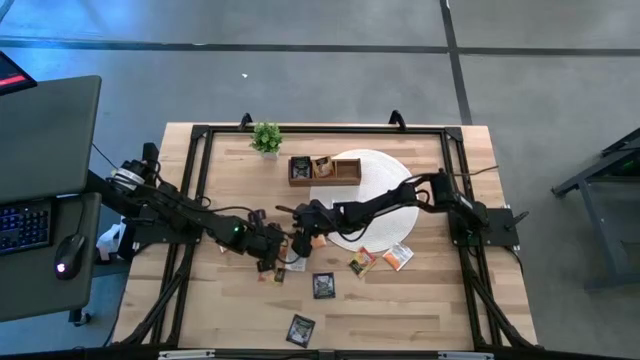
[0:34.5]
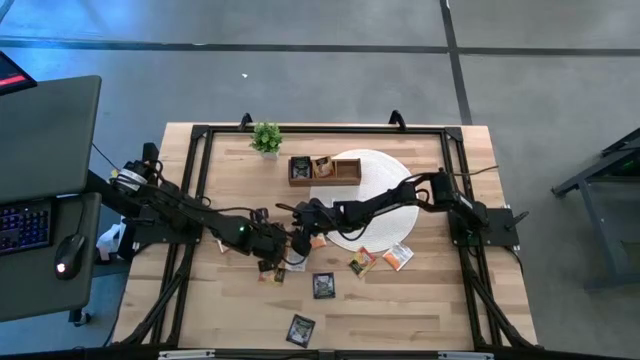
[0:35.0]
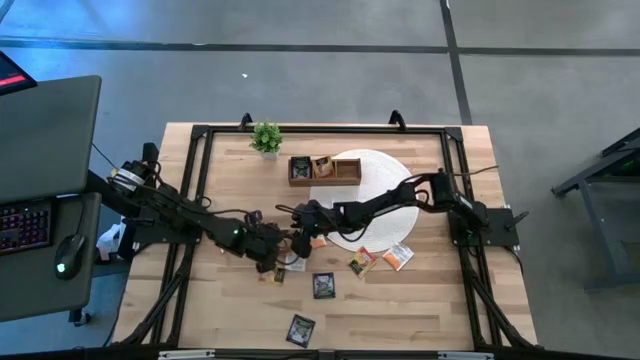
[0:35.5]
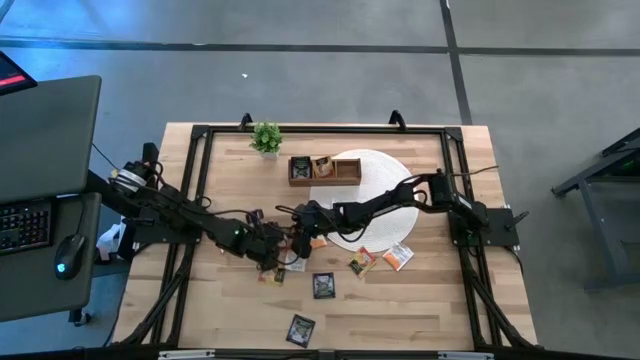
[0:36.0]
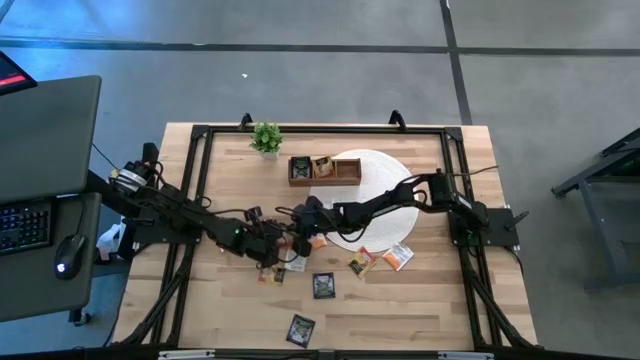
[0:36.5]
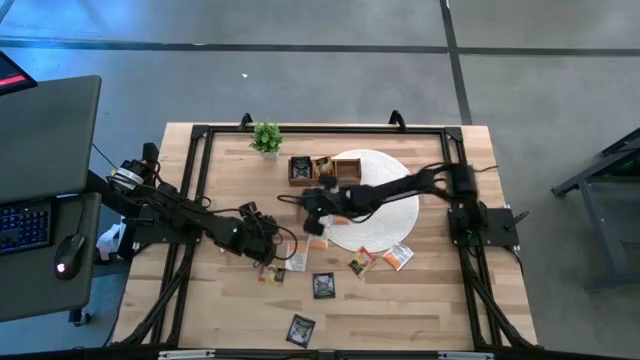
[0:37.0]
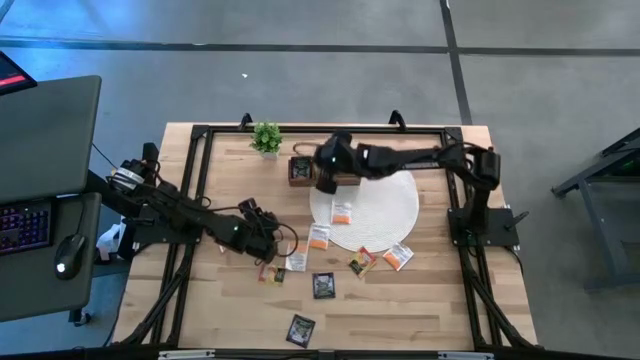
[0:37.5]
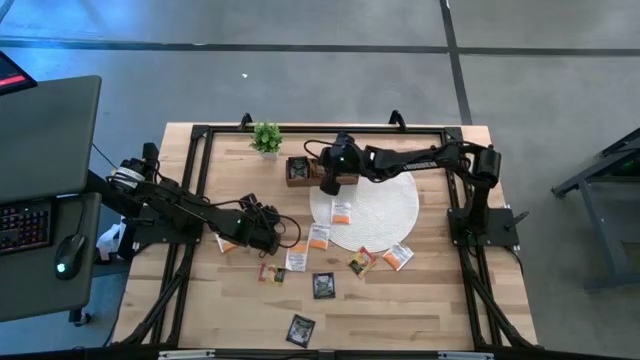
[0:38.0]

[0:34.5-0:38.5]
Task: Pick & Place Tea
Put the orange tea bag into the middle section of the wooden organizer

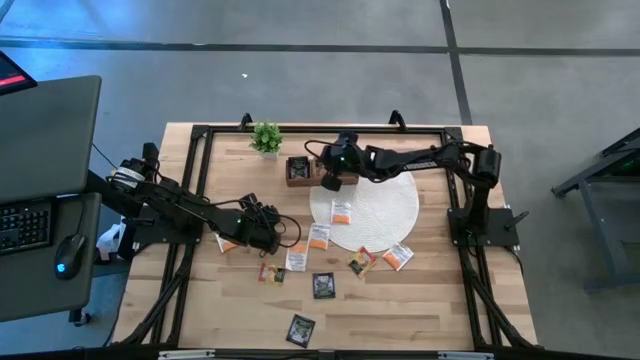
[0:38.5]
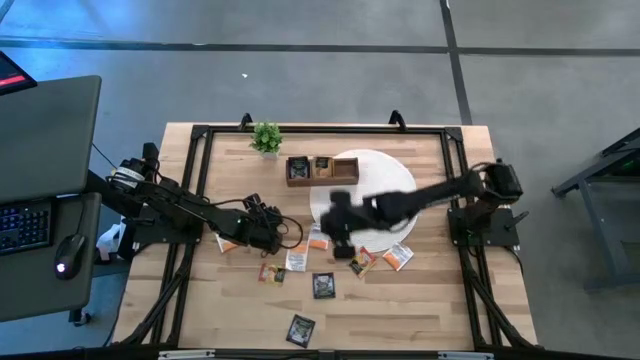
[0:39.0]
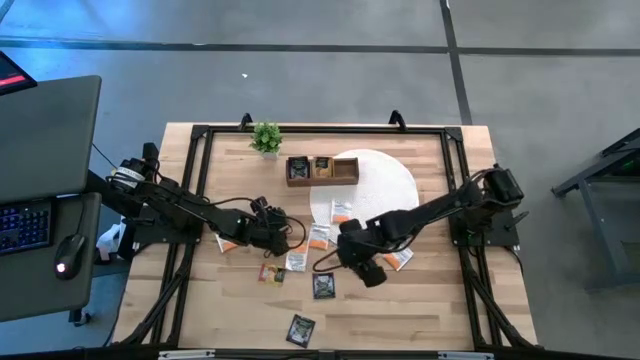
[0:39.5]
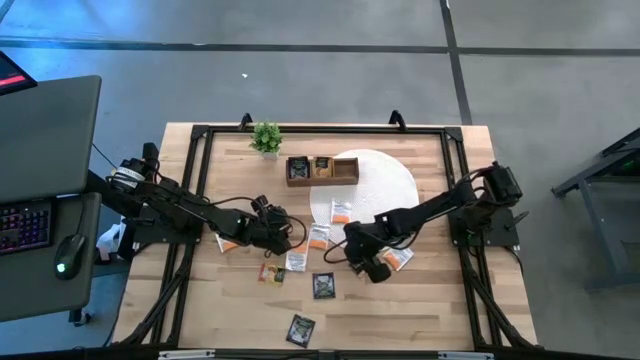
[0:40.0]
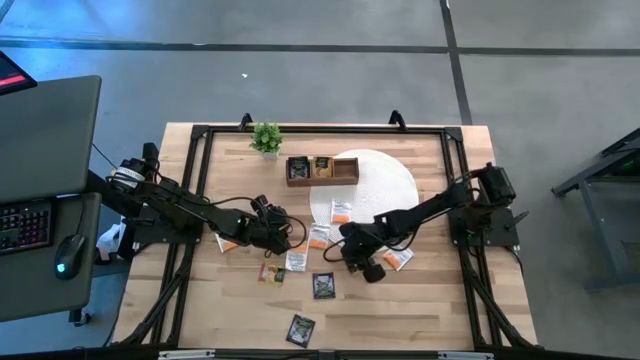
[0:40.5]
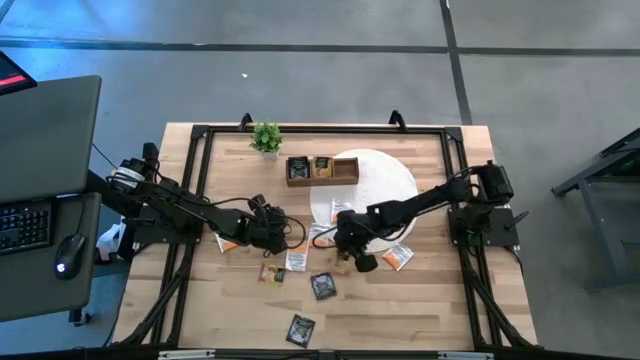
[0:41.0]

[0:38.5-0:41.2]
Put the orange tea bag into the middle section of the wooden organizer

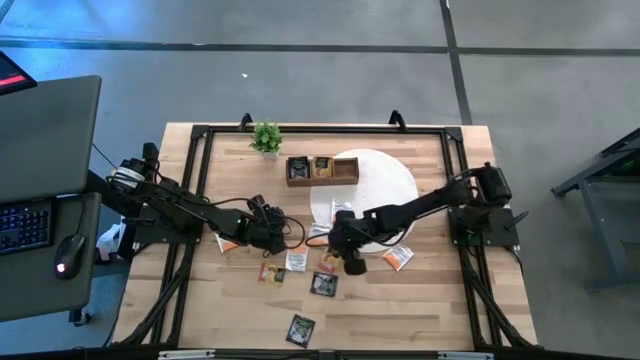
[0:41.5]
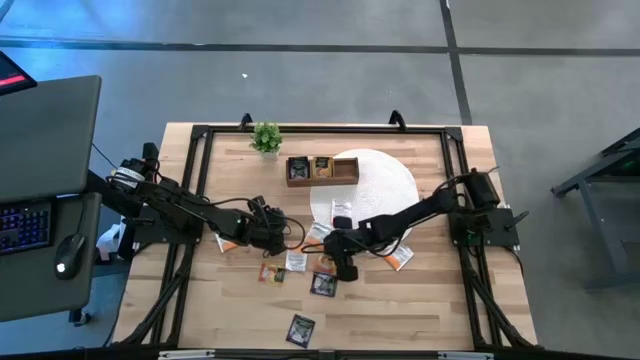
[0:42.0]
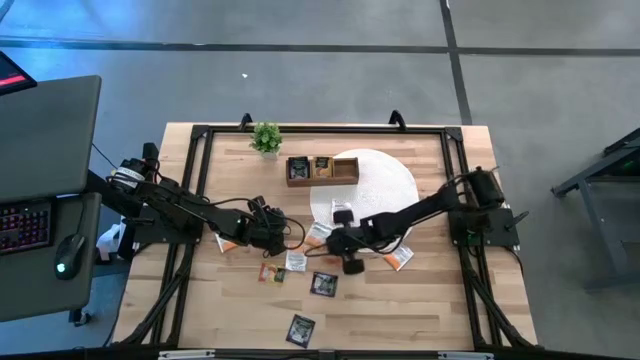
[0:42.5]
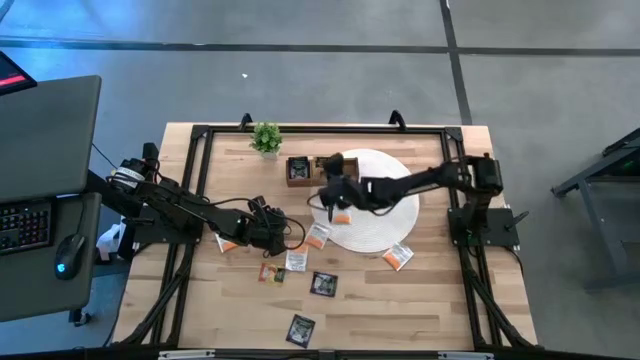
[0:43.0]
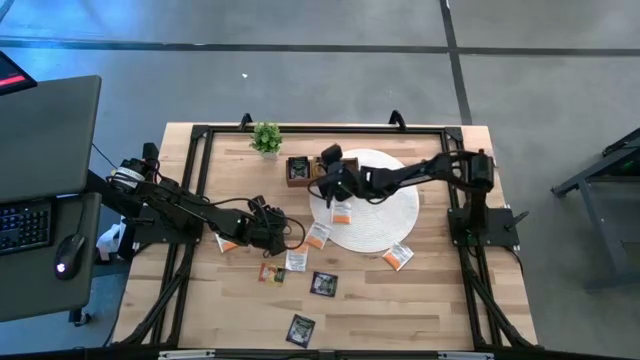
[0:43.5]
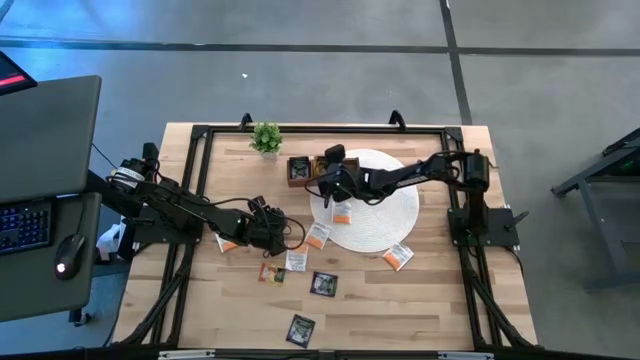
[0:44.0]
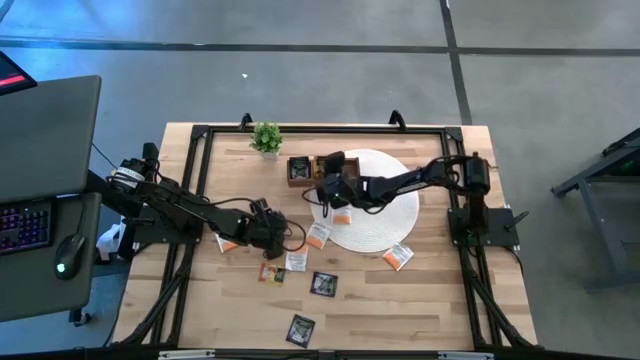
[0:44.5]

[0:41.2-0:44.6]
Put the orange tea bag into the middle section of the wooden organizer

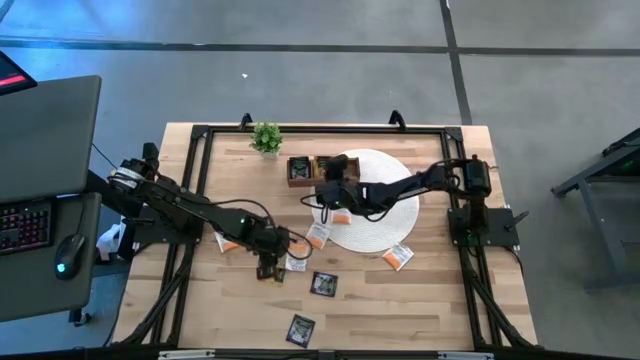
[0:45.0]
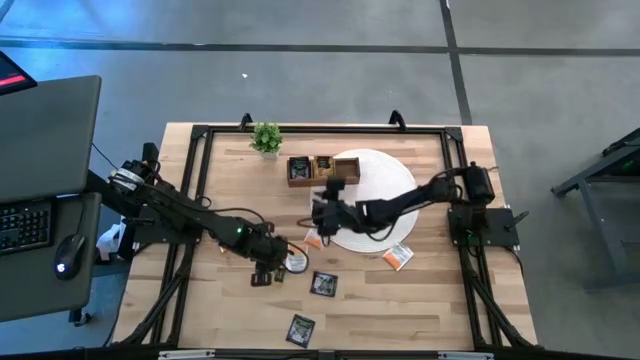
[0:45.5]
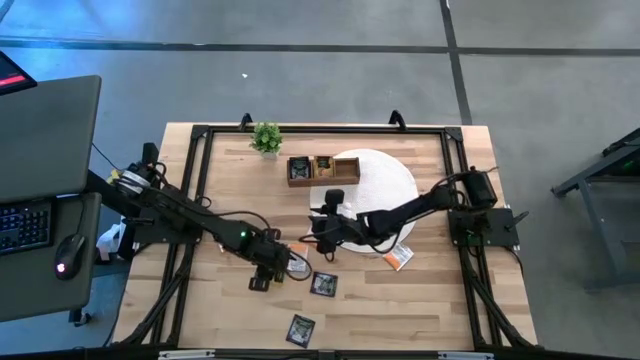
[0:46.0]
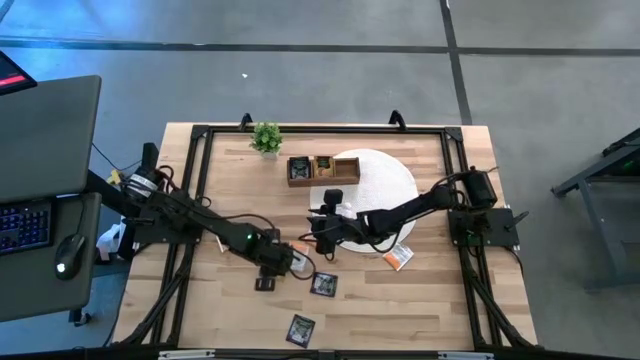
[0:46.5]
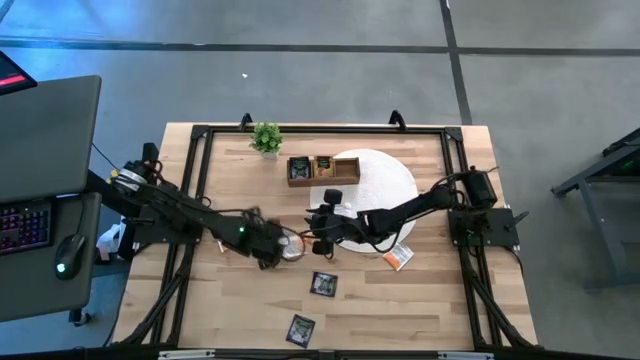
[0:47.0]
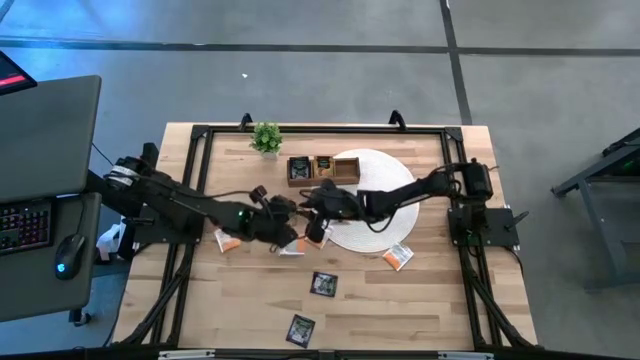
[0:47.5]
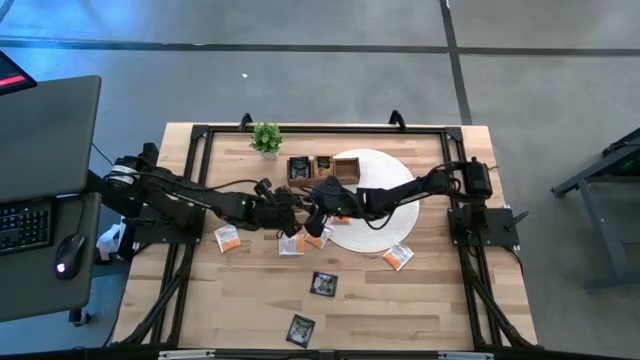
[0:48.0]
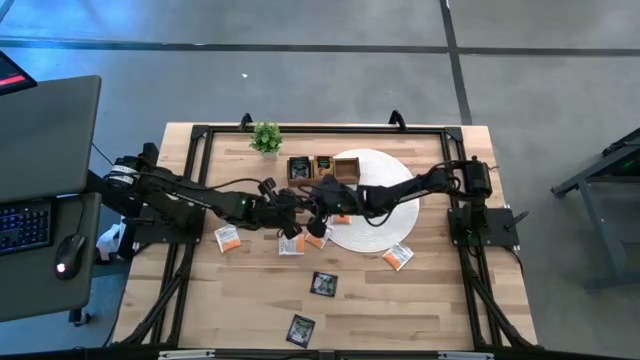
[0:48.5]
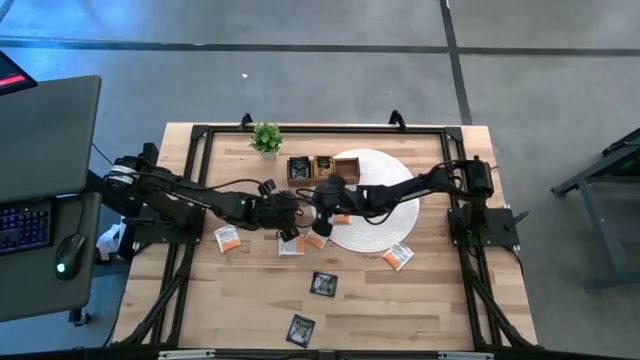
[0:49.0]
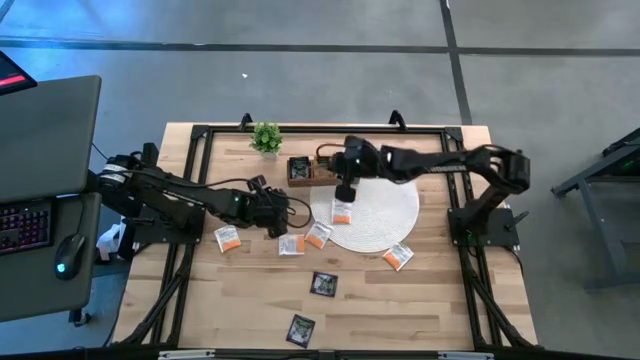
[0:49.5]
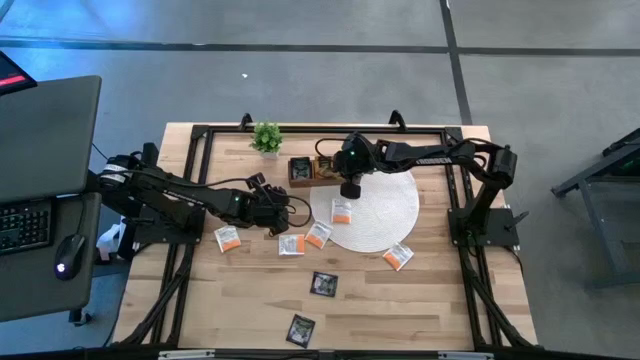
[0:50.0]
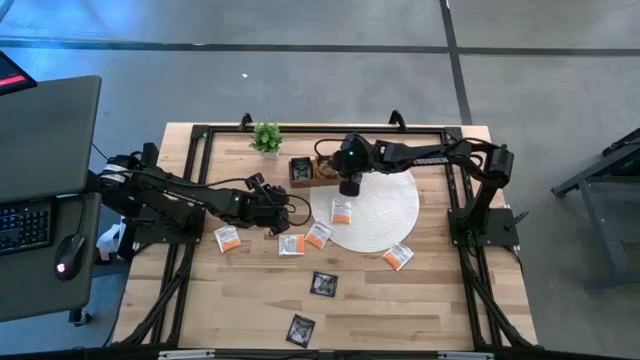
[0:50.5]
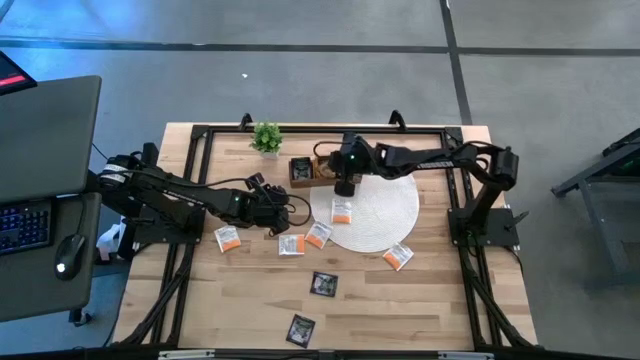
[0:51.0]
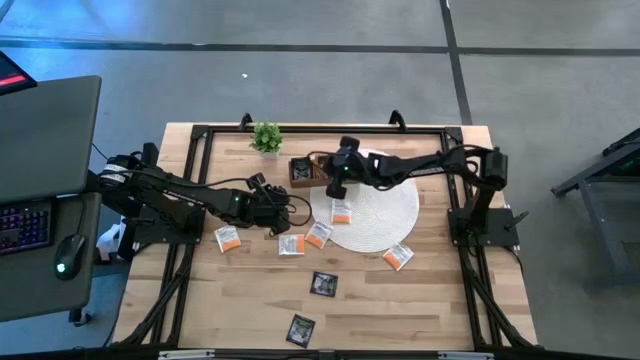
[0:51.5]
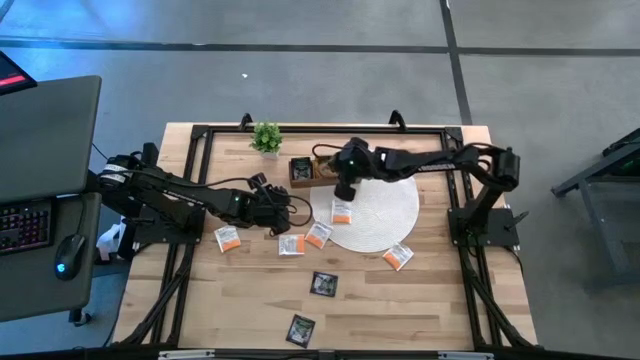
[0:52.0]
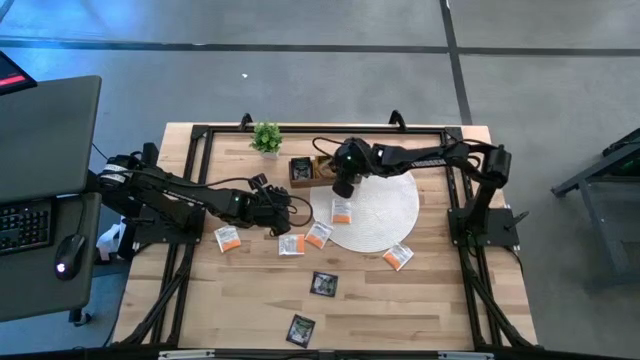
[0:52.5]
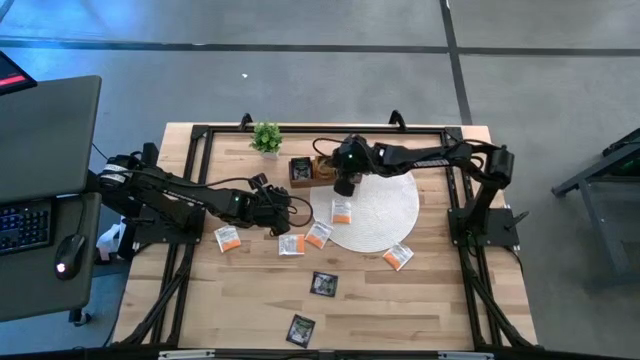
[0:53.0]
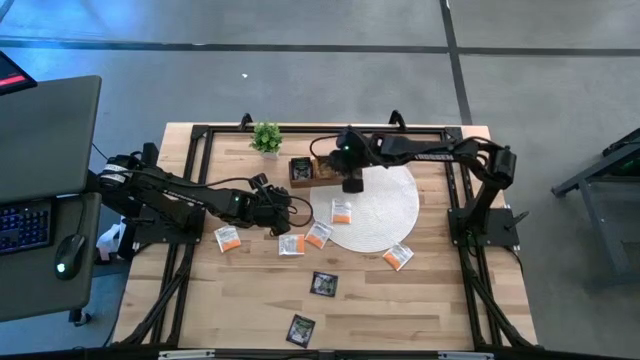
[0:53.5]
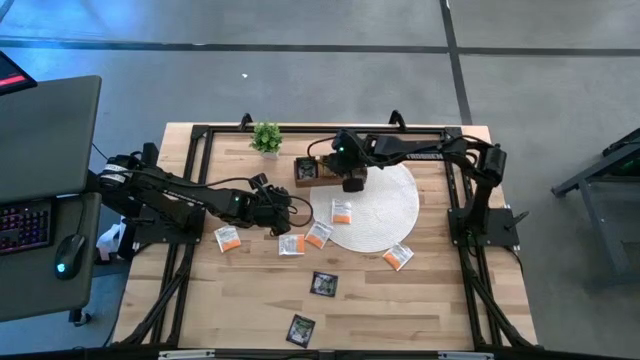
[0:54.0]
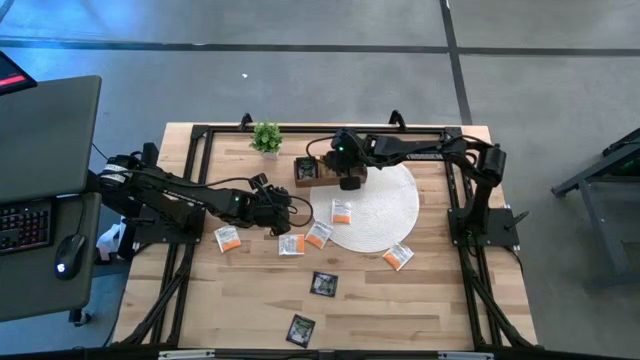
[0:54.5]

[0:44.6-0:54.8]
Put the orange tea bag into the middle section of the wooden organizer

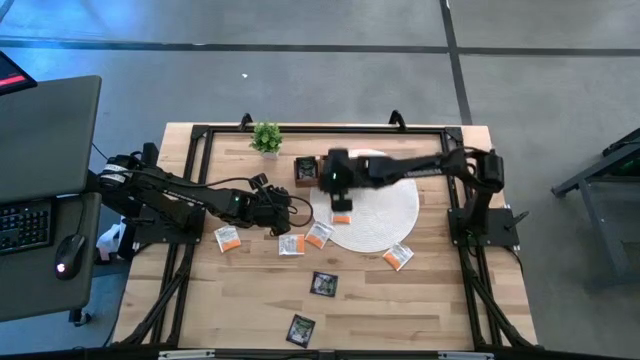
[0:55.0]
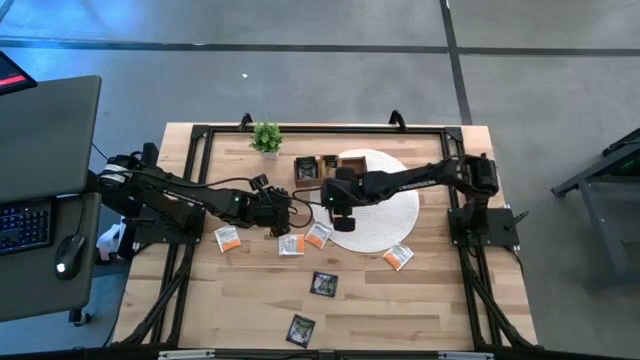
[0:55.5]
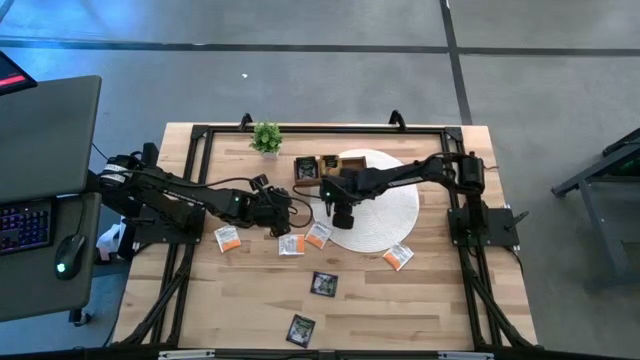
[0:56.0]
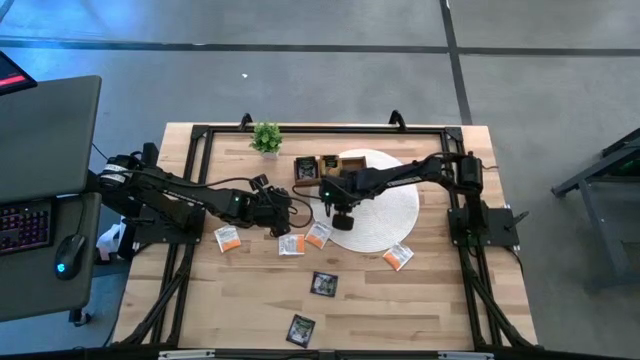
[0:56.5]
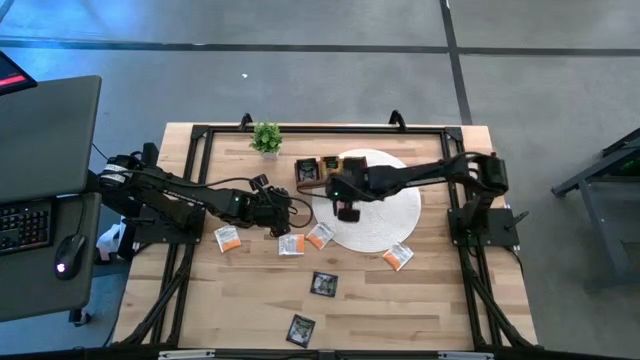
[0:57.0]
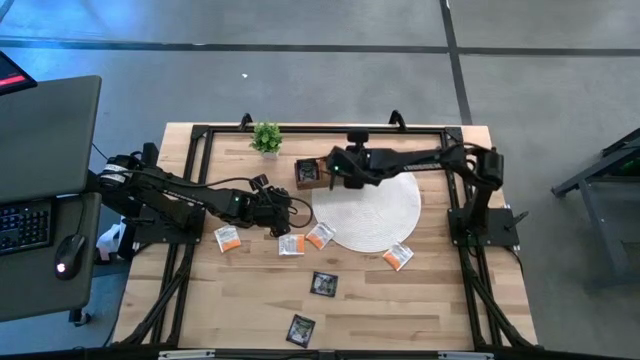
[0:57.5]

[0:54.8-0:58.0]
Put the white tea bag into the right section of the wooden organizer
